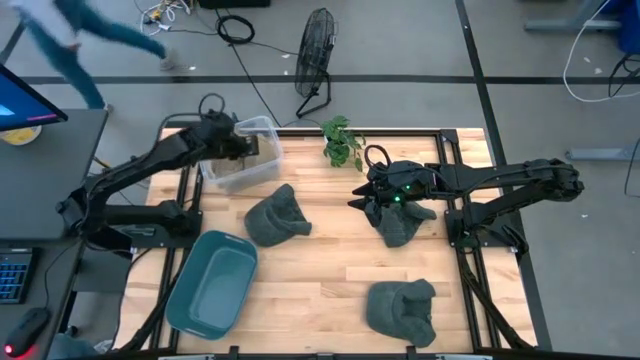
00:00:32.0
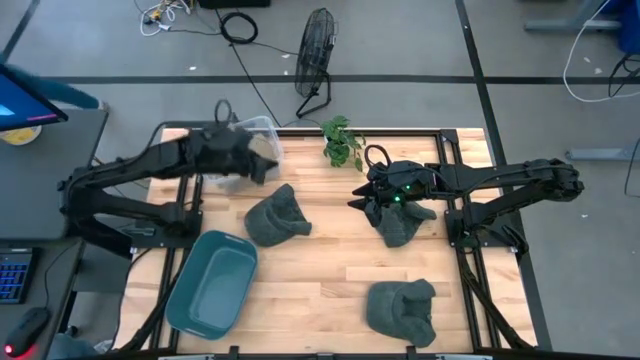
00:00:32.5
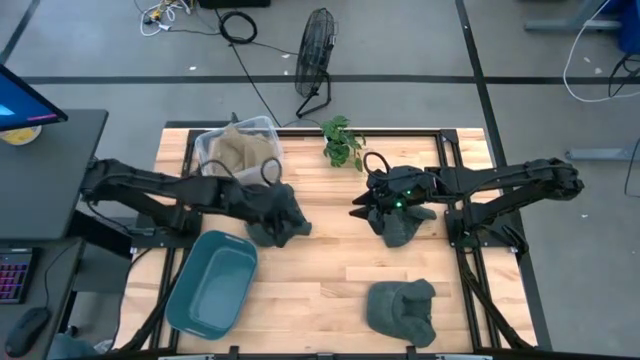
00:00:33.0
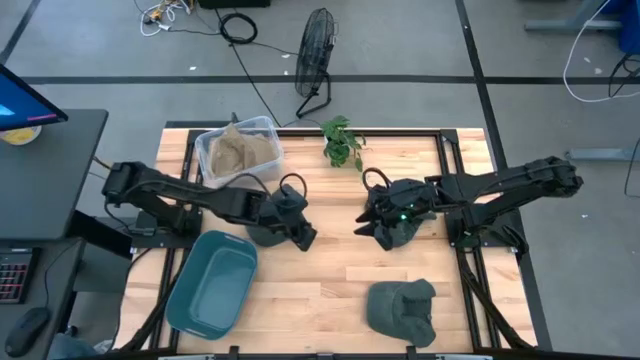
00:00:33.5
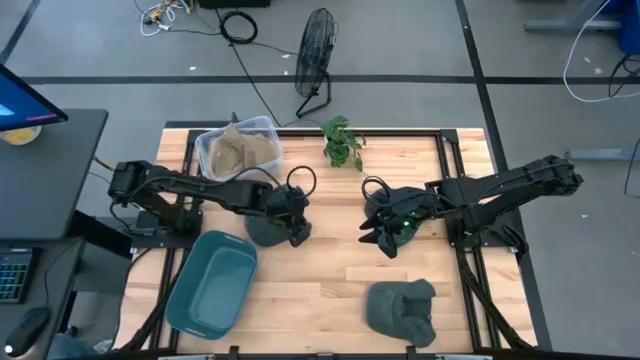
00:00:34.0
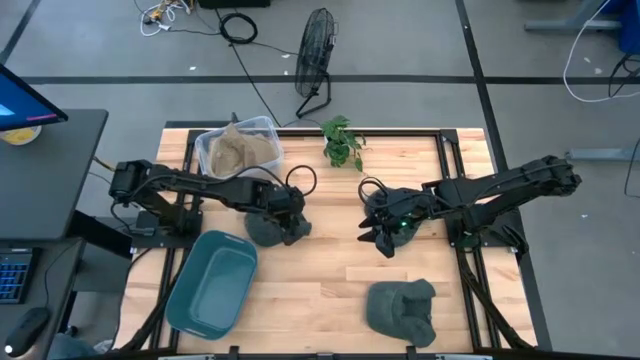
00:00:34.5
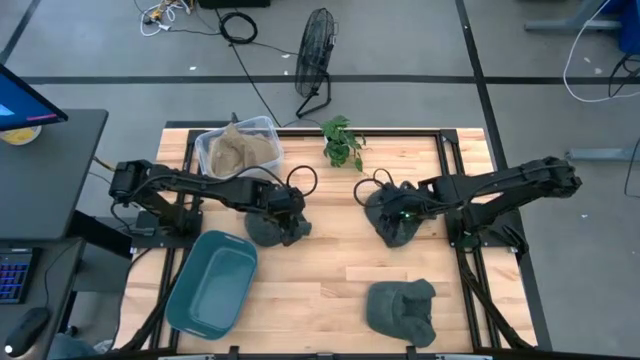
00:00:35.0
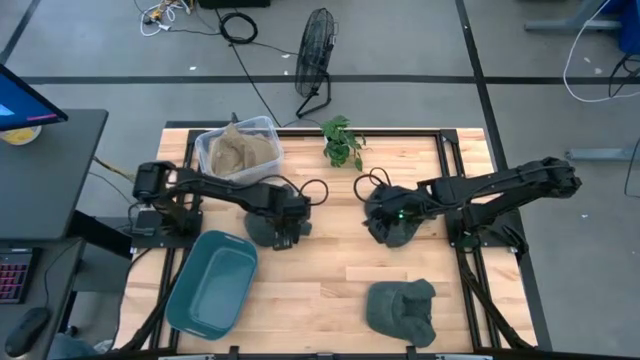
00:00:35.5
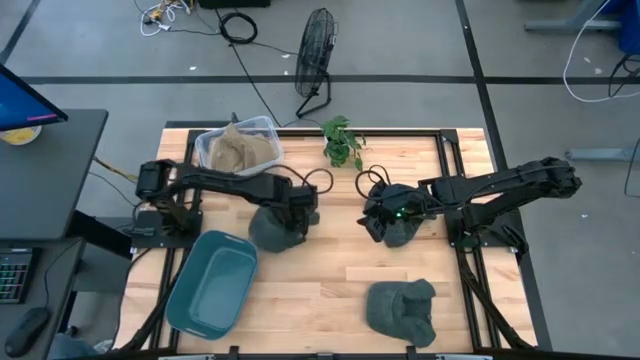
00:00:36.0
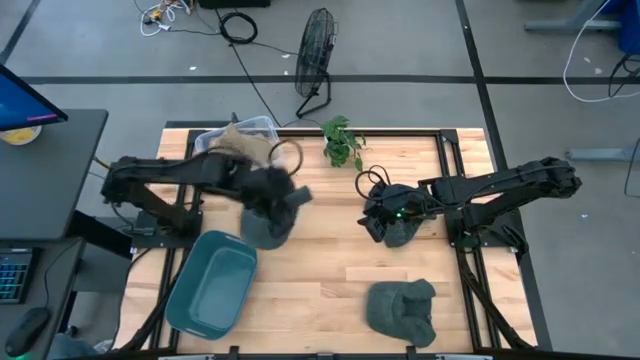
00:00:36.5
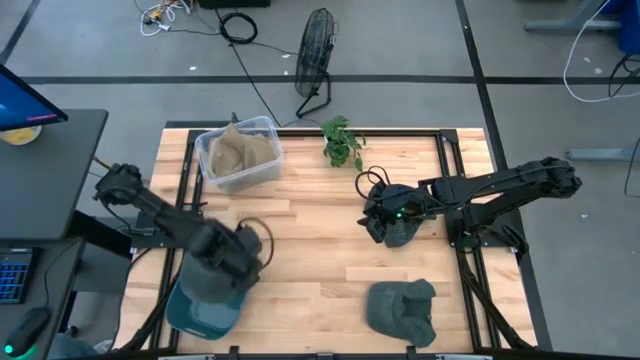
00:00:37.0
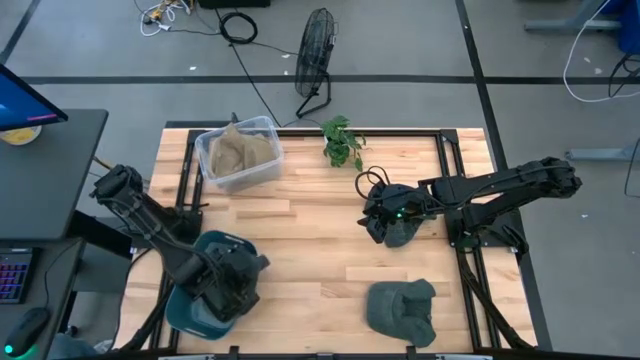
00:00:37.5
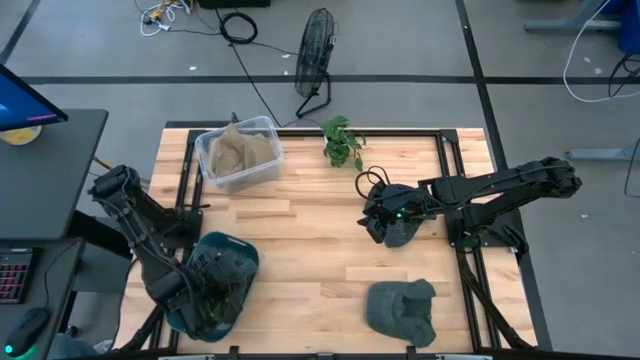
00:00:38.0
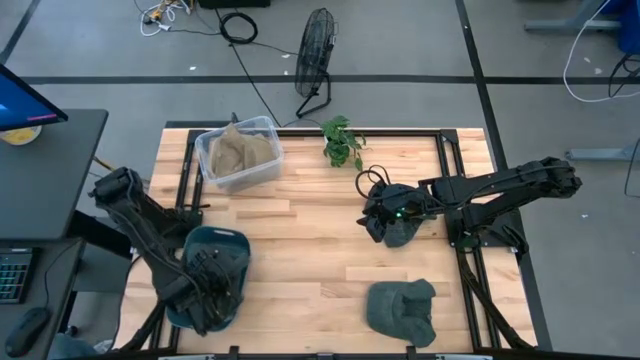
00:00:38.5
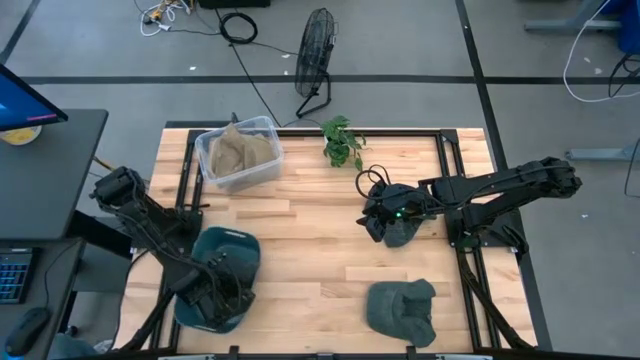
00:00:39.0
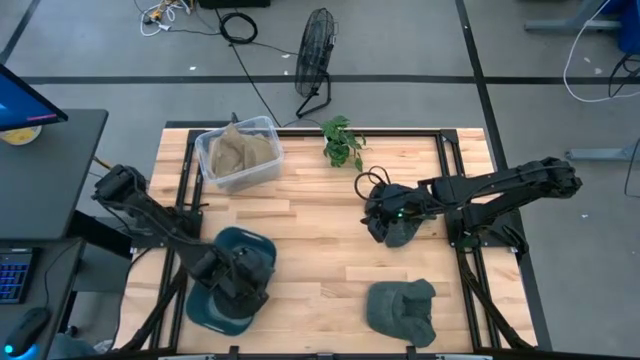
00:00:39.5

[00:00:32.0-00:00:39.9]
Task: Pick & Place hat
Put the top left gray cap into the blue bin

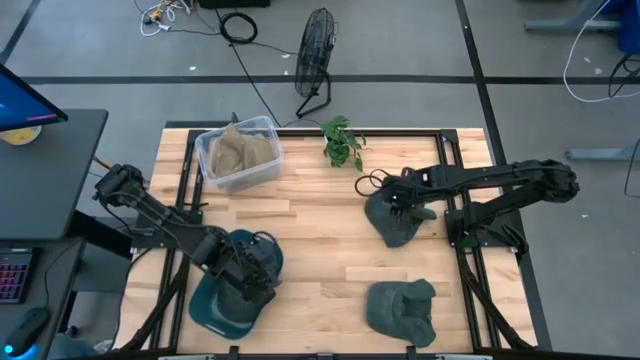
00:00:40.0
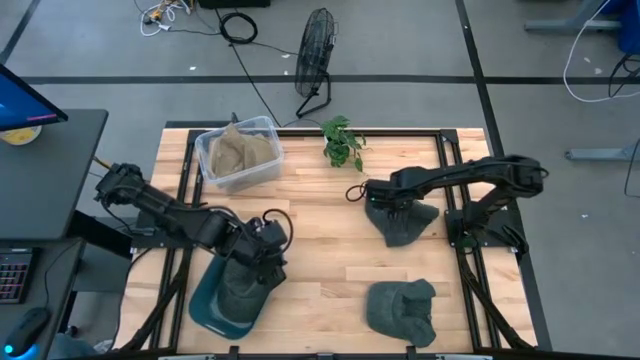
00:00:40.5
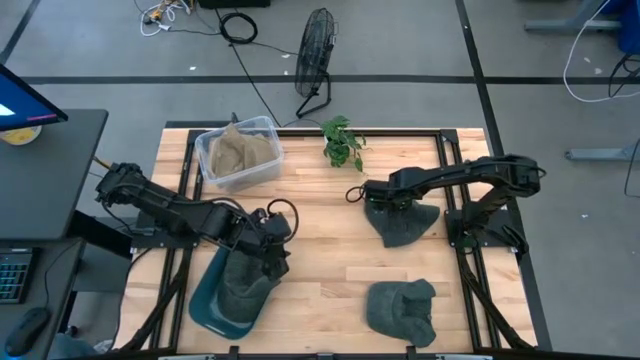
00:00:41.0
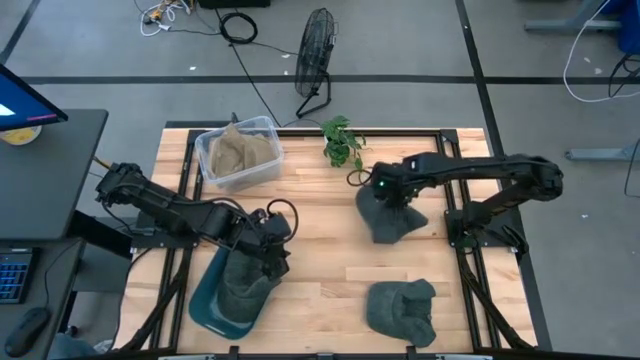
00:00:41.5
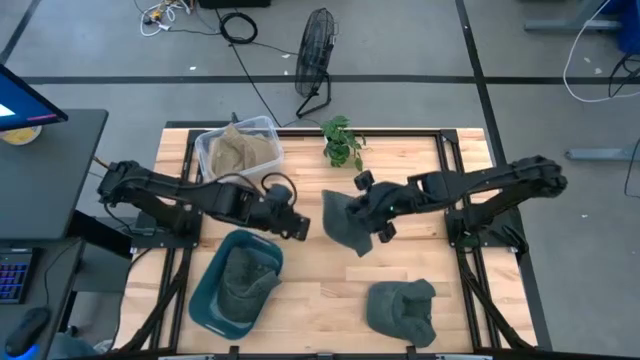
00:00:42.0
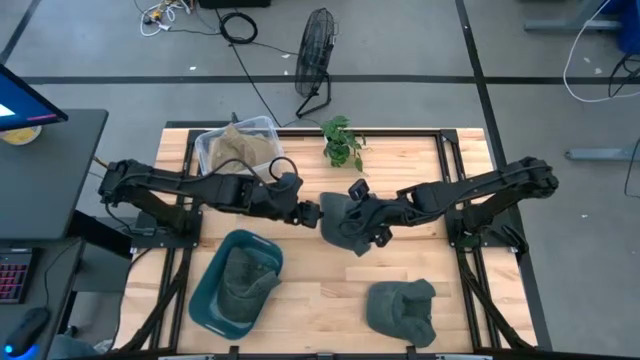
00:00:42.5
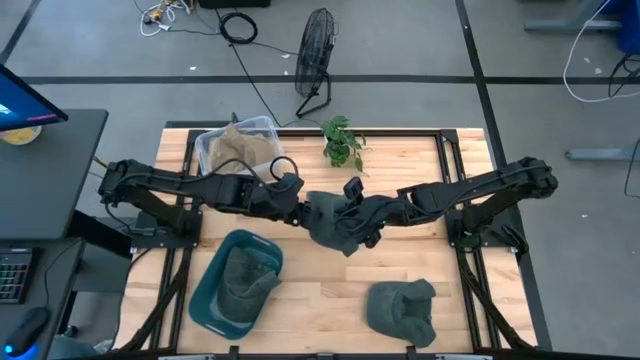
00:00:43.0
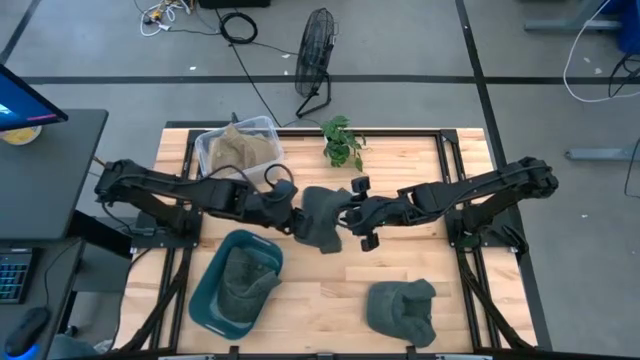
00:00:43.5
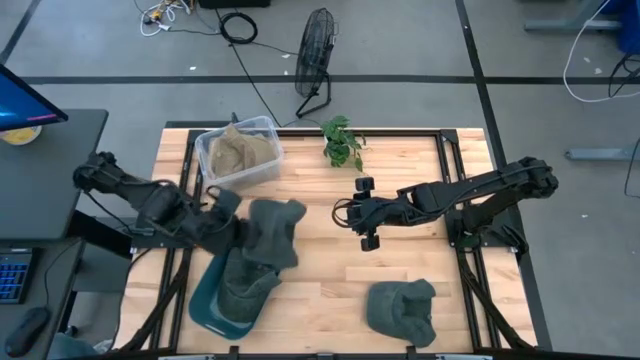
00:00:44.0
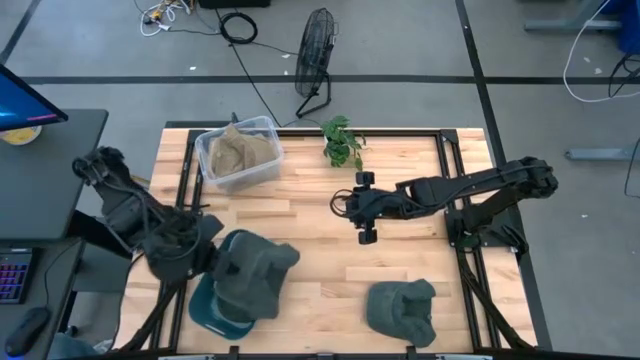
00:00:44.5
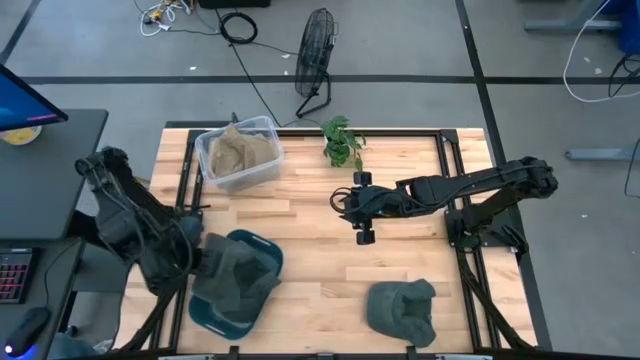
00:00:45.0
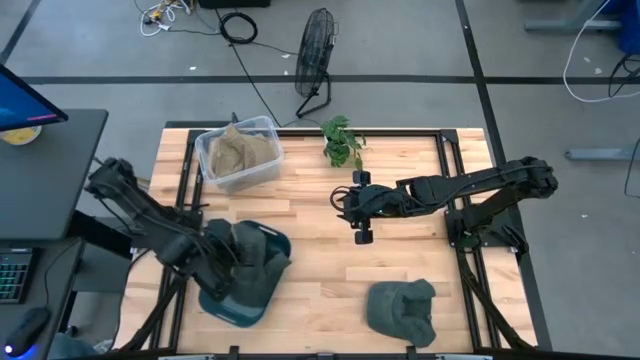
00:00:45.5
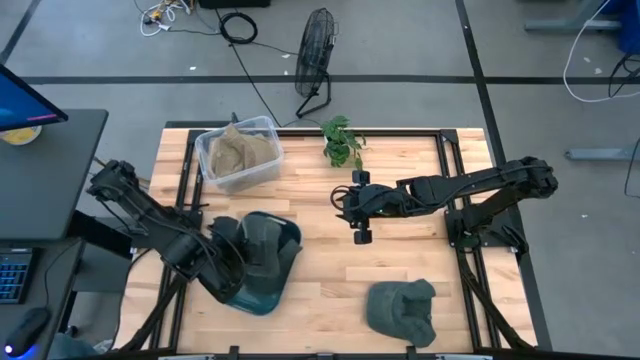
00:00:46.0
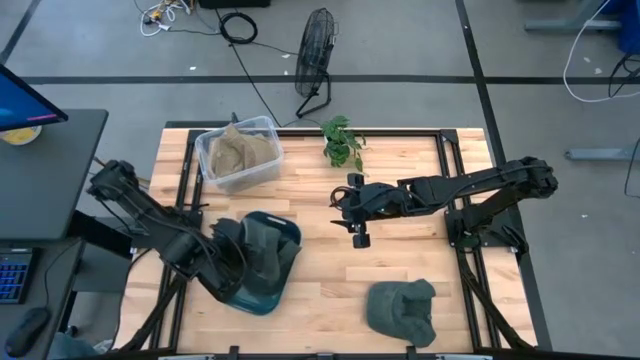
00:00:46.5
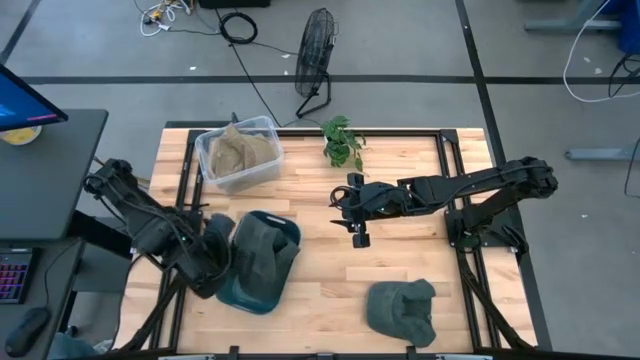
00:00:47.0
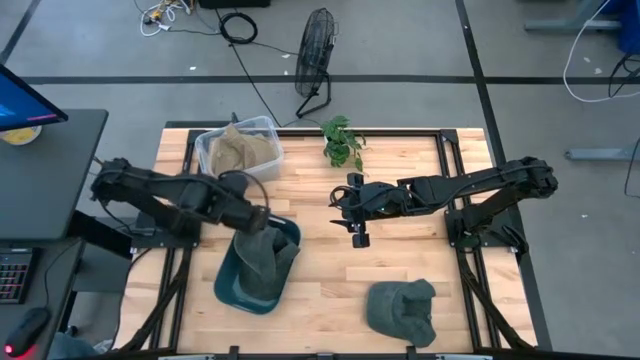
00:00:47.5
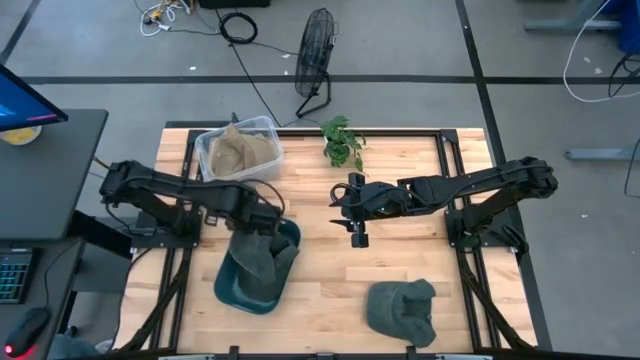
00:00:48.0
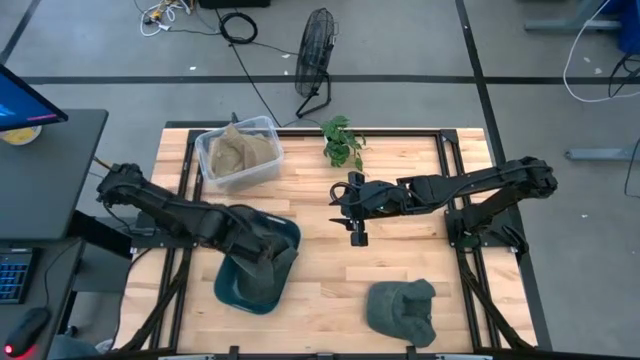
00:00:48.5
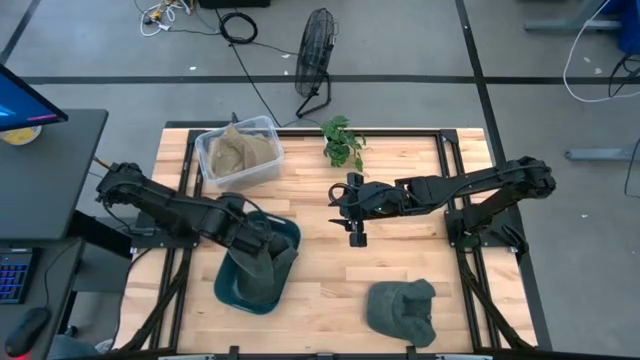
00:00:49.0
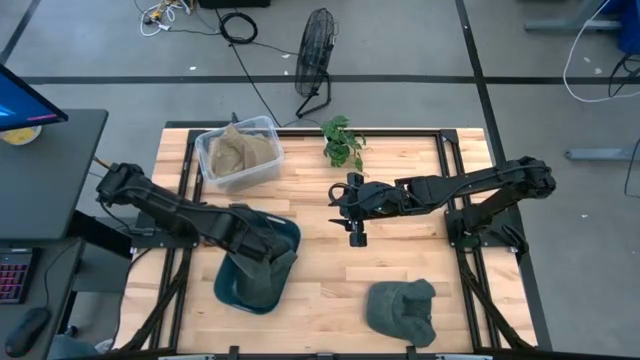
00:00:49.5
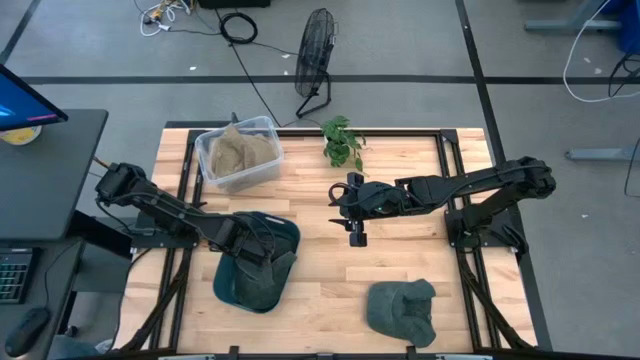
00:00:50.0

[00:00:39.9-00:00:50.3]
Put the top gray cap into the blue bin

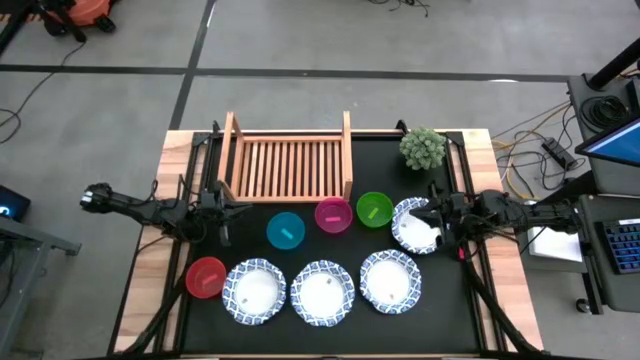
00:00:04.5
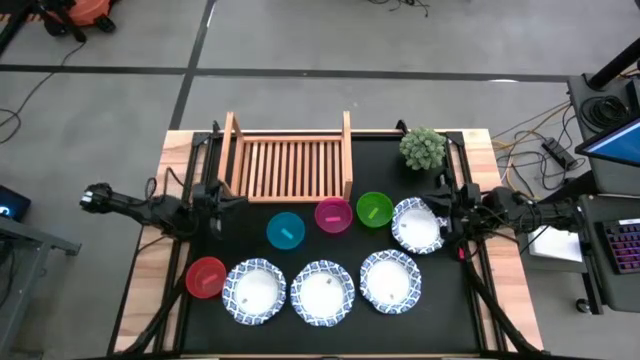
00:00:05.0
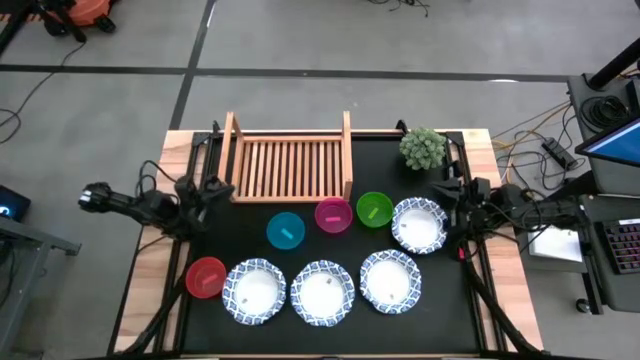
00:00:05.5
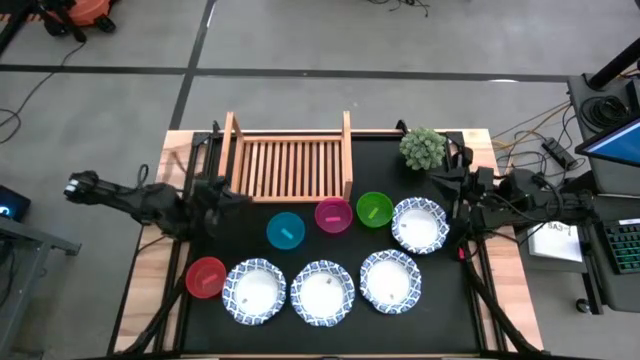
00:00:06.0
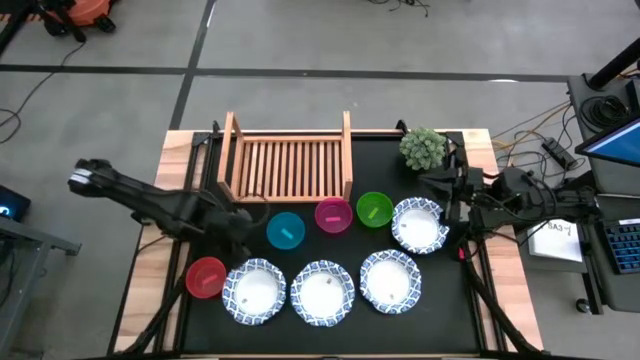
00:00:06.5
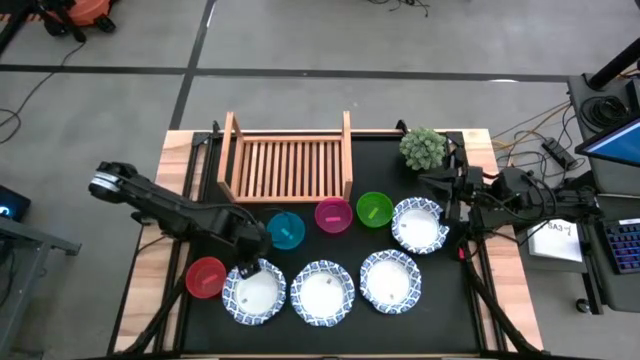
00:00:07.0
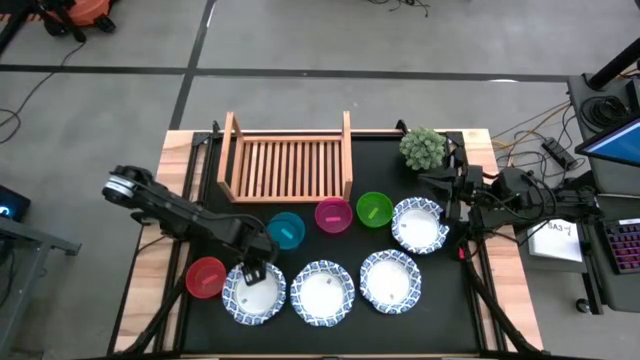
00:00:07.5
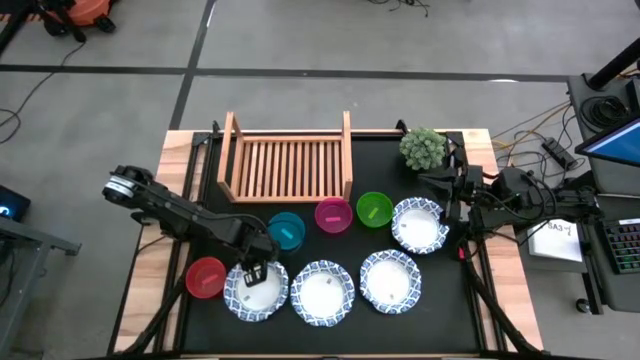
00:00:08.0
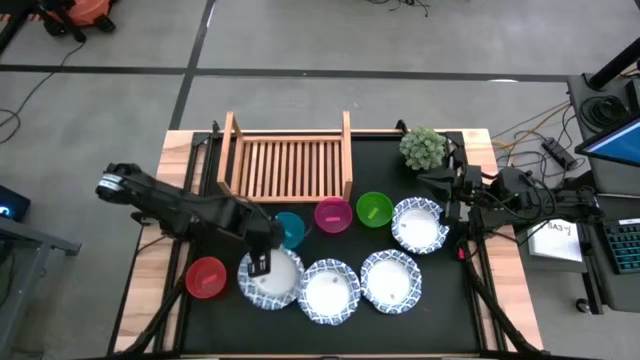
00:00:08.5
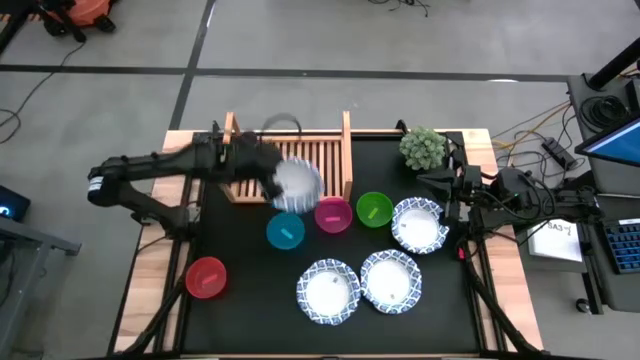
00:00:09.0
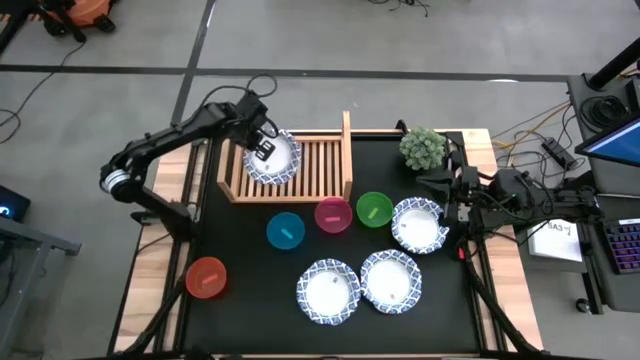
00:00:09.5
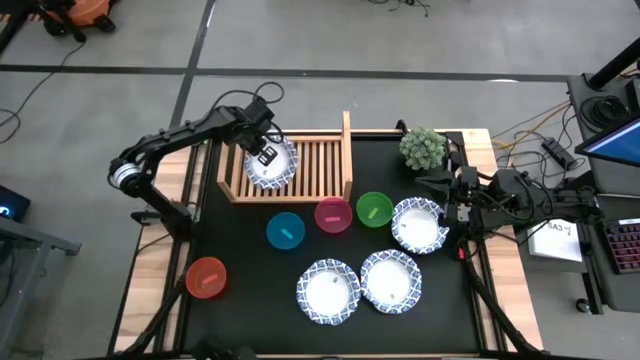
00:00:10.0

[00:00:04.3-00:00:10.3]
Task: Place and stack bowls onto a shelf
Put the blue patterned bowl on the shelf
